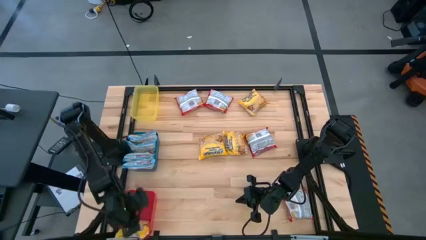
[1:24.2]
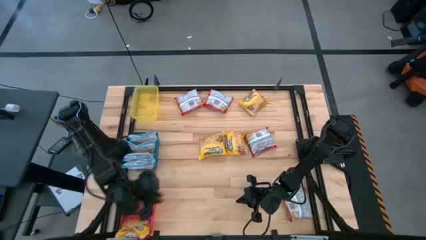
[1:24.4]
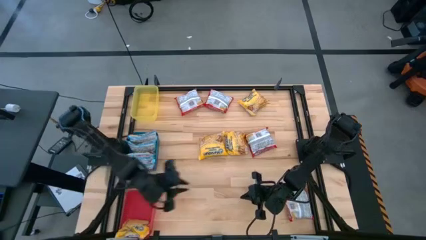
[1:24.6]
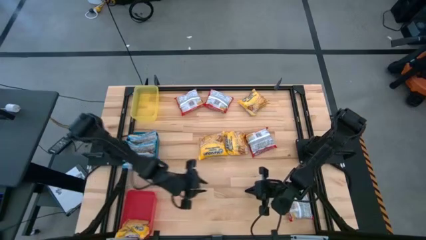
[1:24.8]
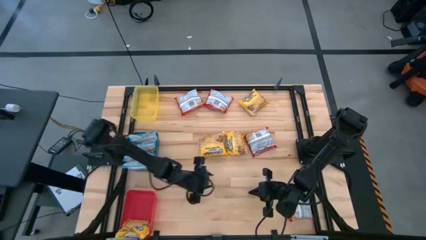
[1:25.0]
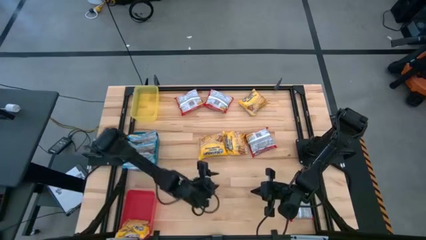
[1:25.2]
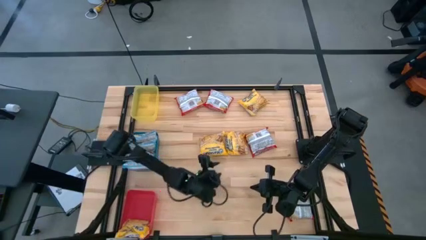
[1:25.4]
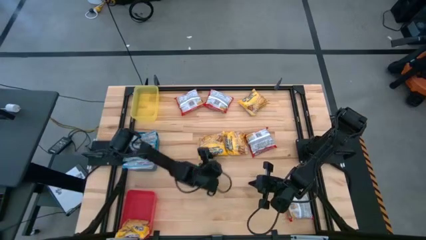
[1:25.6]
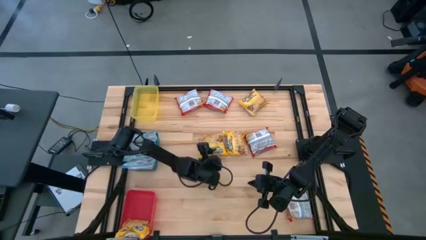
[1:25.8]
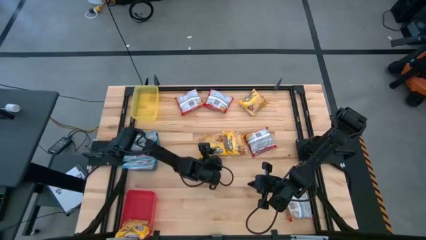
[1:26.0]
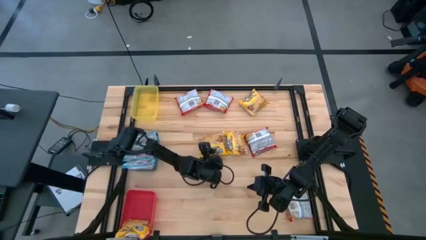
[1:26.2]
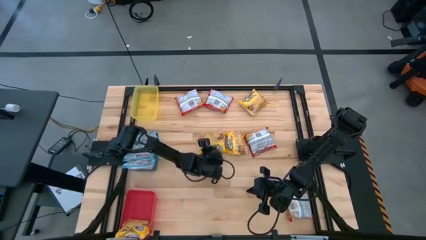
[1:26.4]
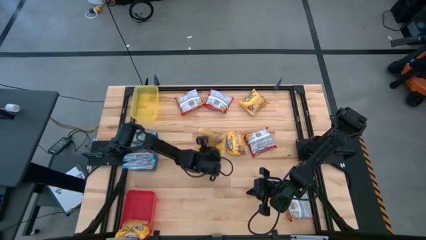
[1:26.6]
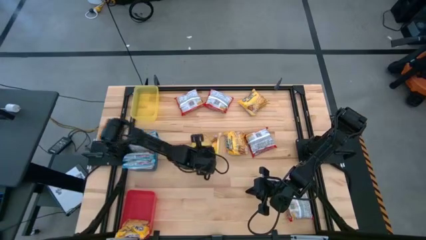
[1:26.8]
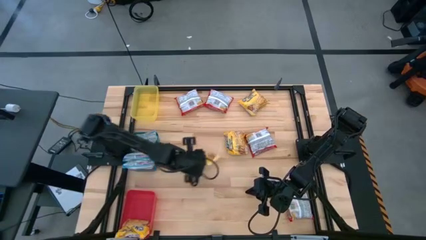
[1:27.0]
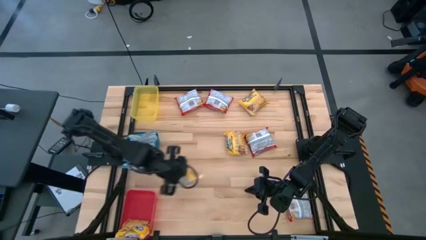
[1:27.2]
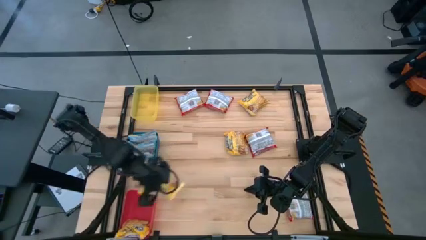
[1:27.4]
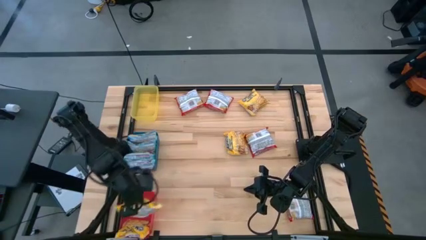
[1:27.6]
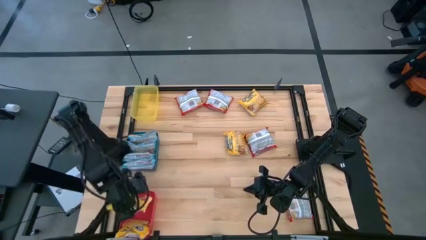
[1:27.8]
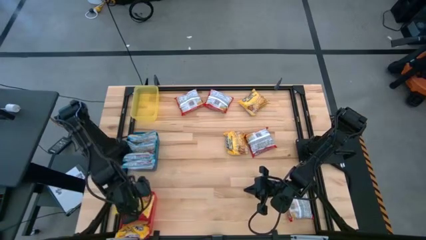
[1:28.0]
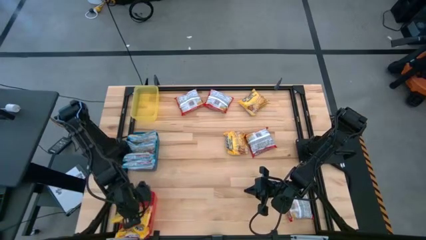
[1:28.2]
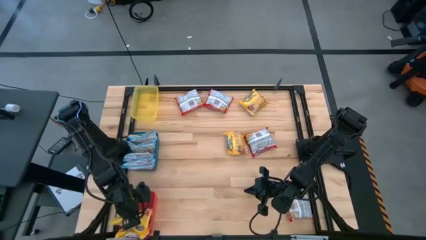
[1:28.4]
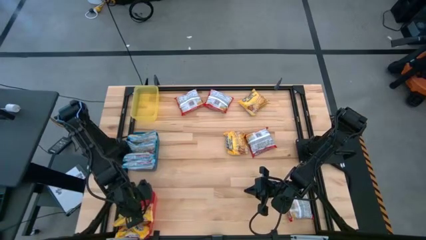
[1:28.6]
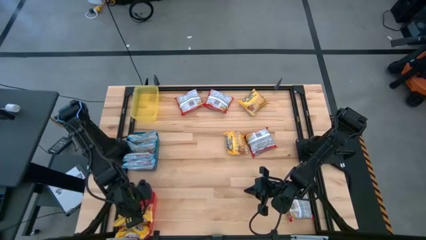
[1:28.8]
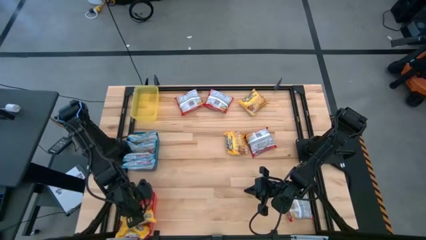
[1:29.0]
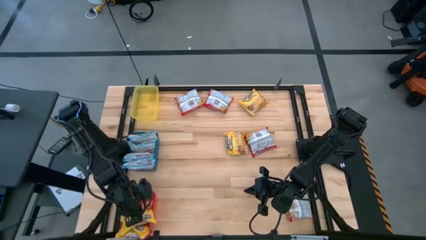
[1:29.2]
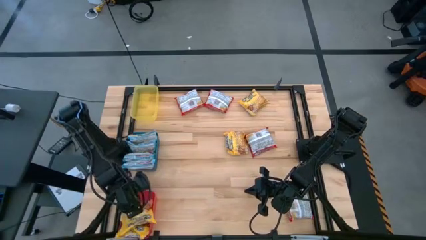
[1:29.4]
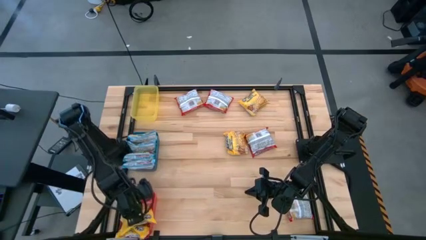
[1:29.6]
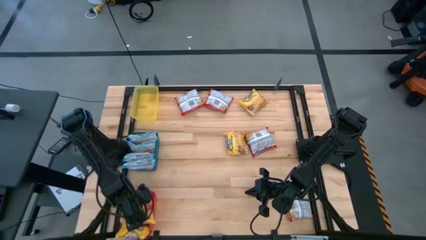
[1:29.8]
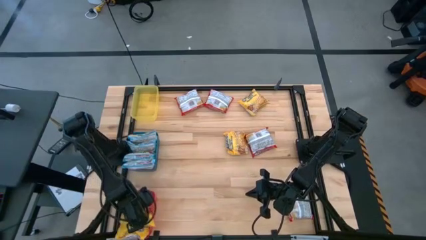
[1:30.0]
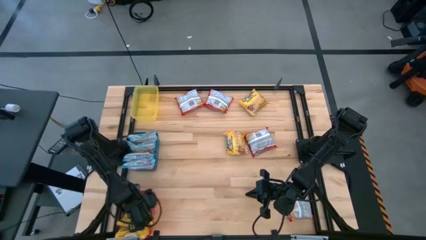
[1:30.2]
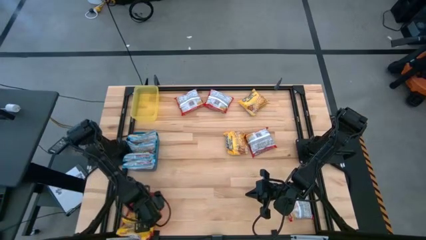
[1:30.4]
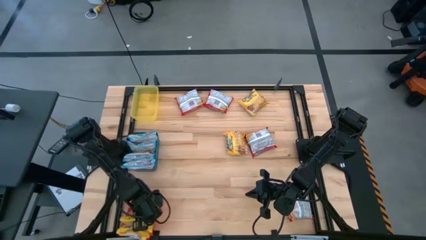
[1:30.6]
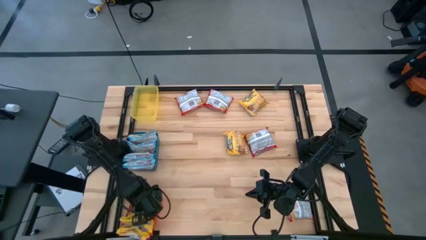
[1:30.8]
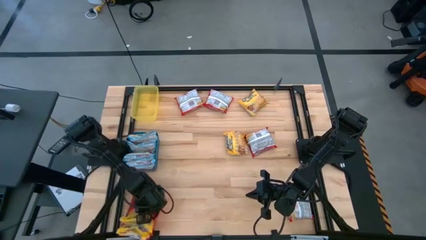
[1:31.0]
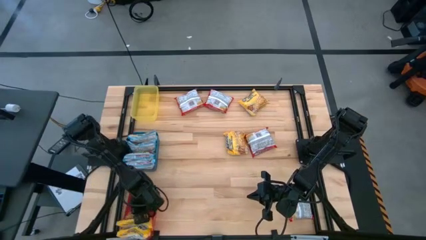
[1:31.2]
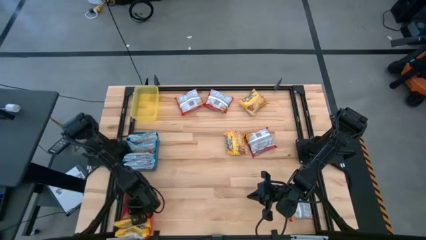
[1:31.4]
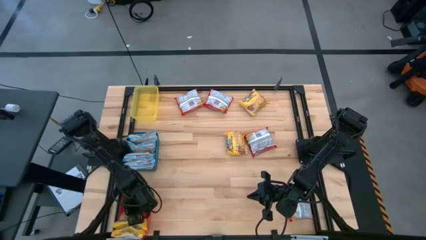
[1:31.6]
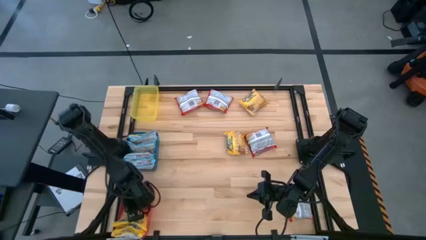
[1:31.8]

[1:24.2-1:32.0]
Task: Sort Maruchan noodles
Put the bottom left yellow noodle pack into the red bin

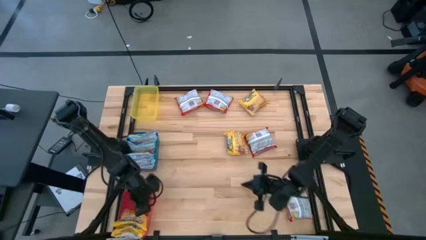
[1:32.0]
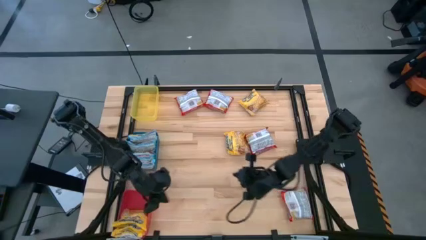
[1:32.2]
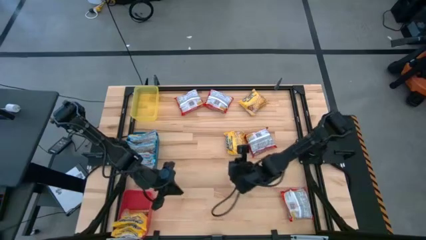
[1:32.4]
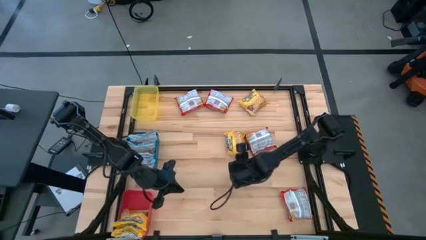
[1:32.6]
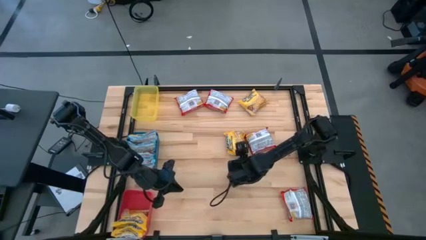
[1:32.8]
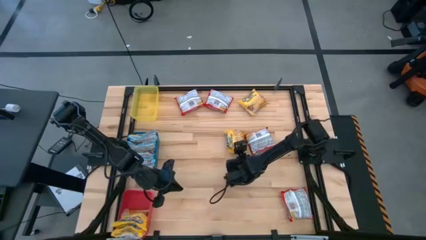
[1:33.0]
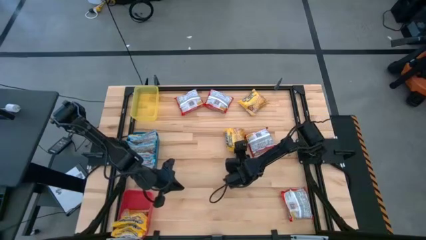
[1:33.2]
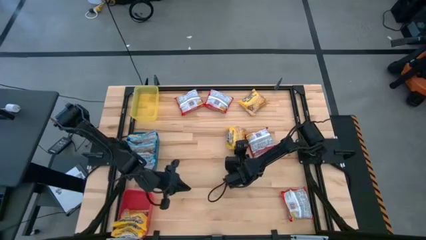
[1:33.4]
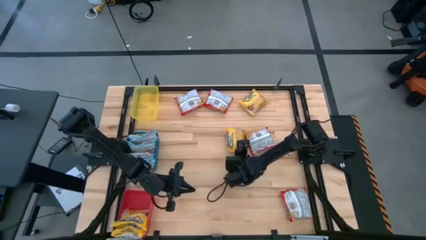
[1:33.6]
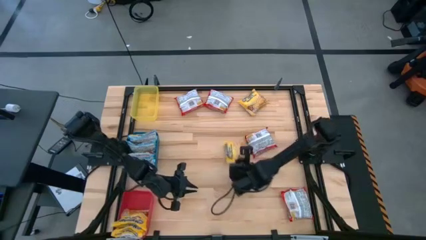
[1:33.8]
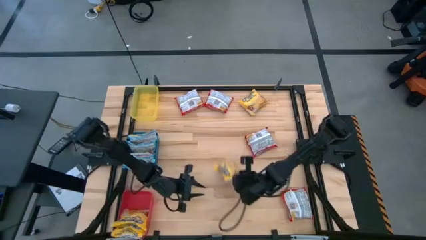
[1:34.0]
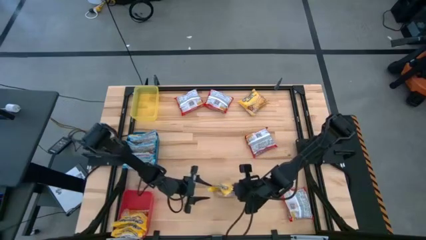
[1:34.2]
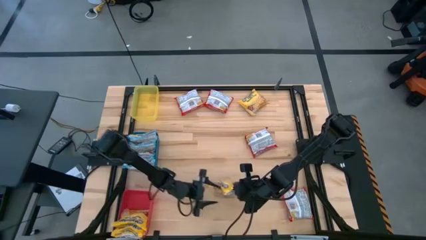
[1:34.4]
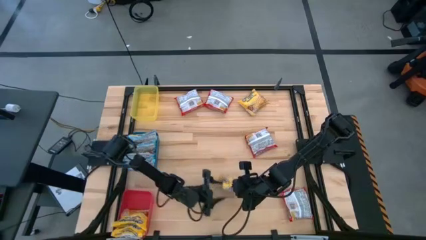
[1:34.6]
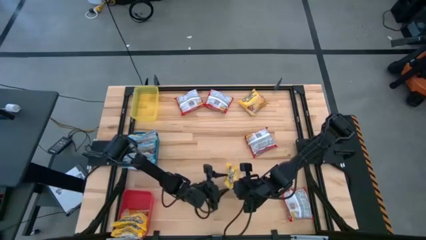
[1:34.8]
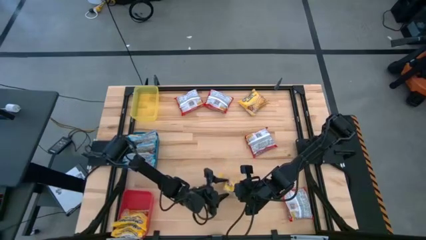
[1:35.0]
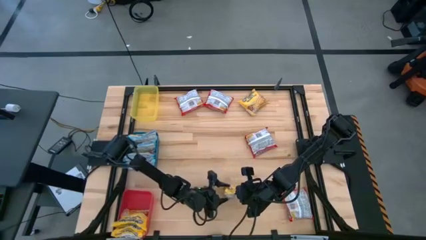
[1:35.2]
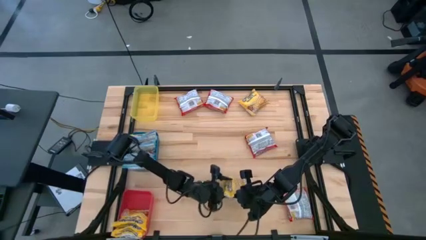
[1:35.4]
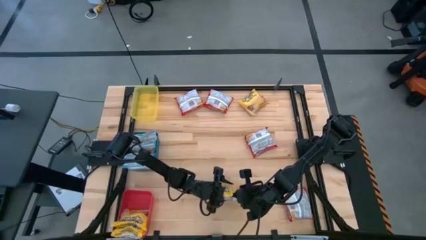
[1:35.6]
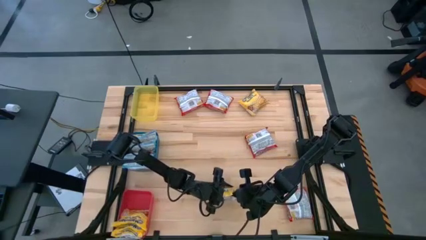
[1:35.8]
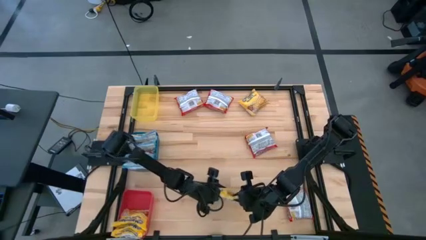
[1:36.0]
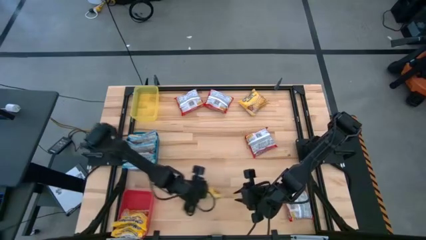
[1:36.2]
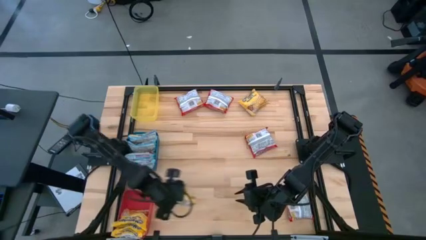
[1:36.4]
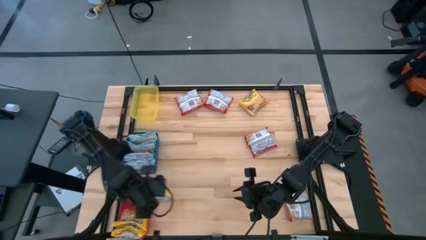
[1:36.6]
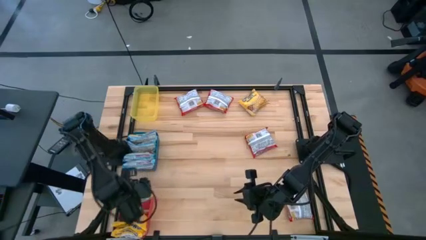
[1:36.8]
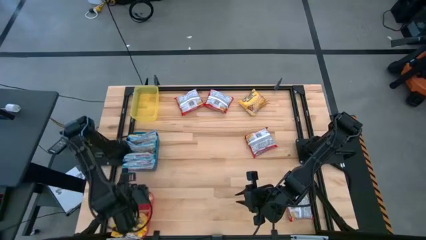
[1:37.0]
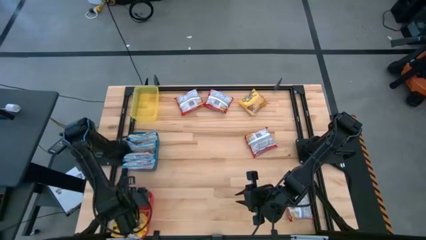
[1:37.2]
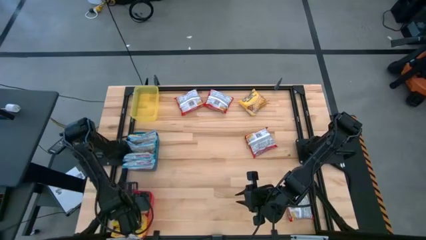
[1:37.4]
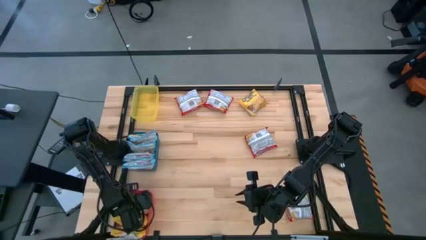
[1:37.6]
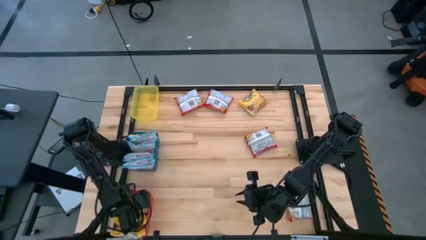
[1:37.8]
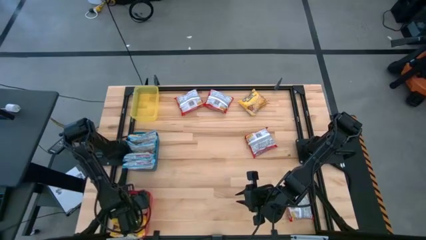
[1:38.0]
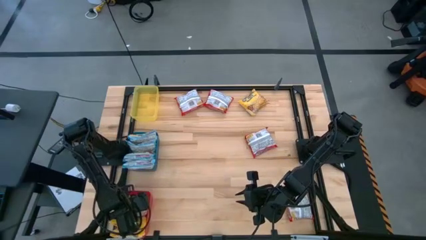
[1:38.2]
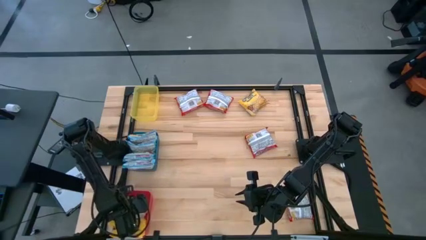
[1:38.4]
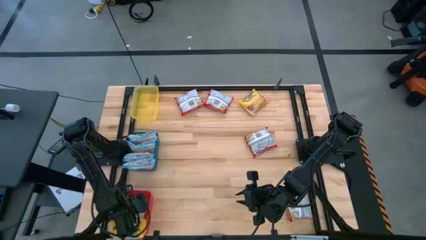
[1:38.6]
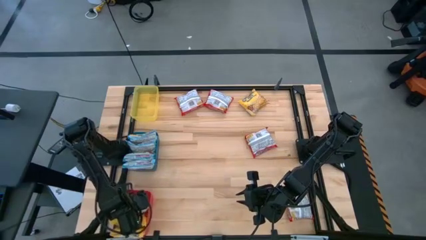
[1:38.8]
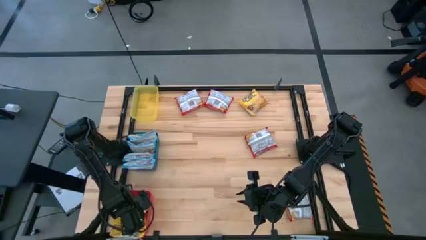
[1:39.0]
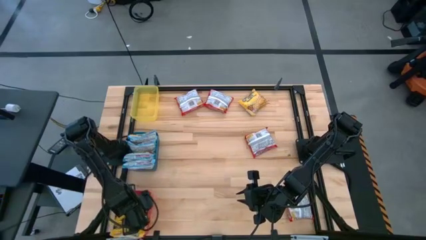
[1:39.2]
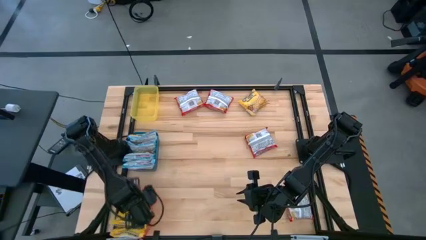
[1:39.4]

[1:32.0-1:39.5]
Put the bottom yellow noodle pack into the red bin

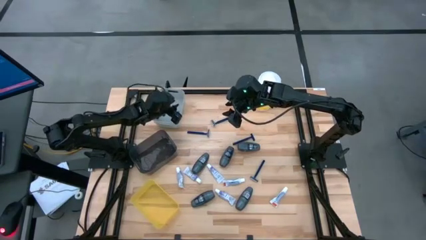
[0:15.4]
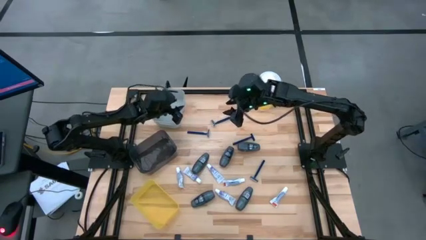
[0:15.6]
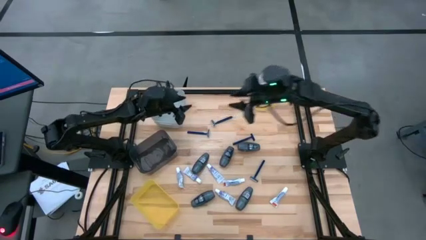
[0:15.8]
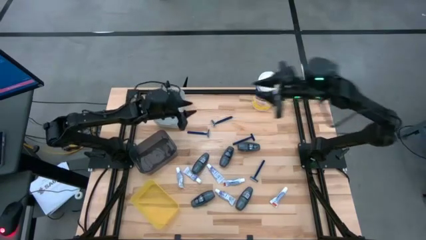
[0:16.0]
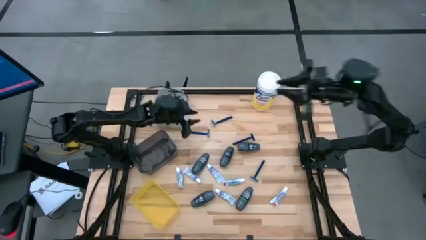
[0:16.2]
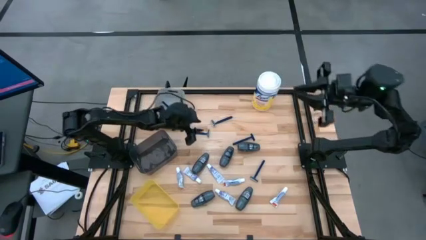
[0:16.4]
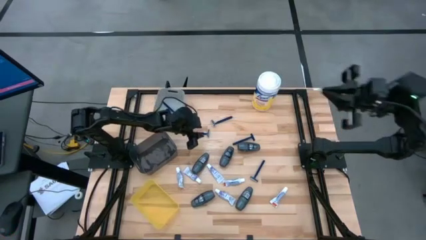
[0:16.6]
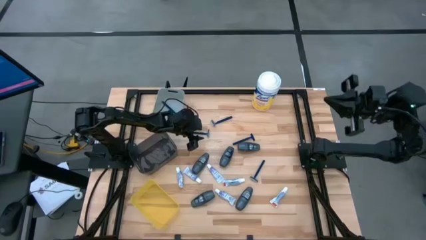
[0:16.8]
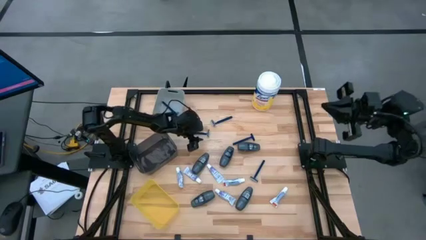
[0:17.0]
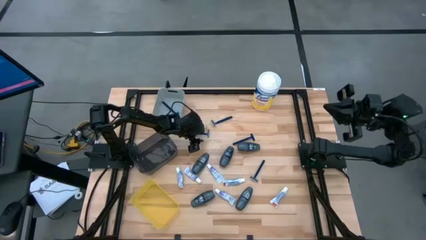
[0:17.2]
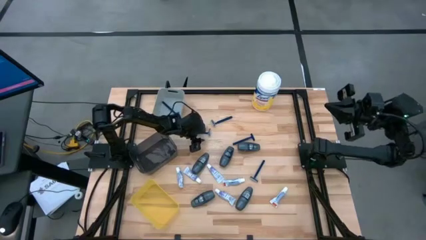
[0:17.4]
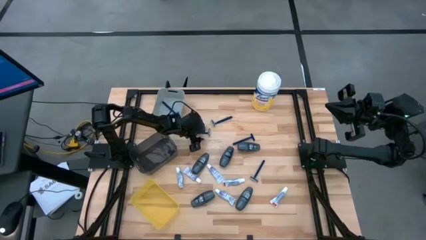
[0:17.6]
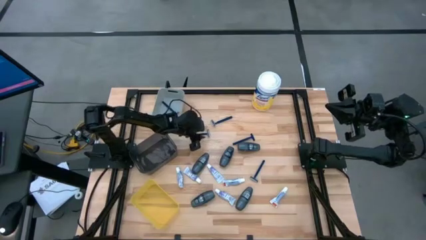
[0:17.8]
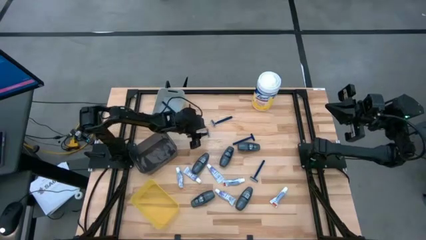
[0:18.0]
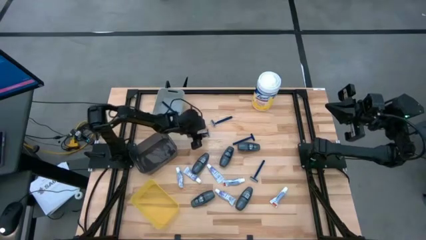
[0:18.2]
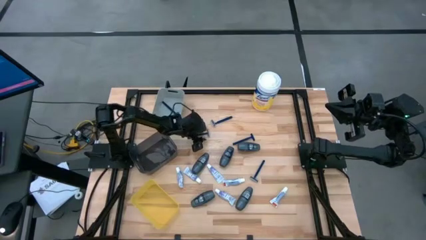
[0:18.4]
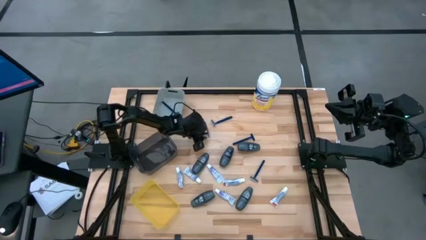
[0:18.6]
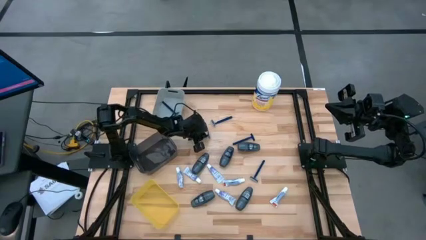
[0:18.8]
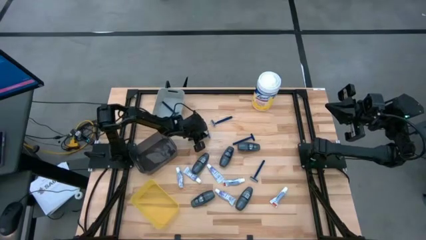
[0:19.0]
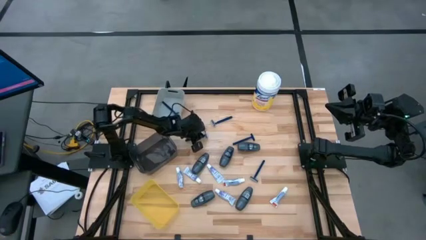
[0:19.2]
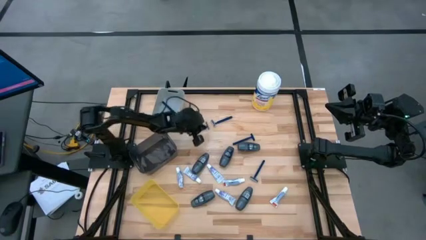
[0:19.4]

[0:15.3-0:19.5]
Task: Pick & Place Travel size toiletries
Put the razor into the gray bin
